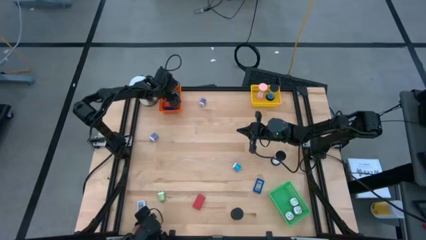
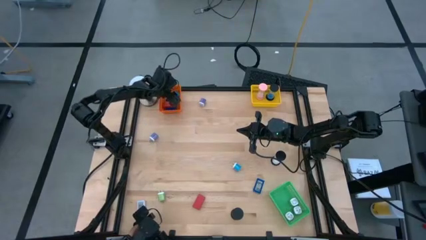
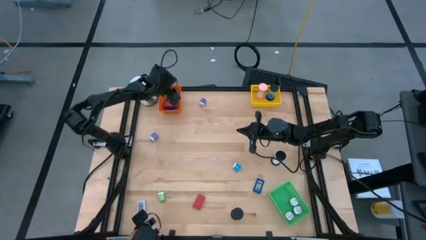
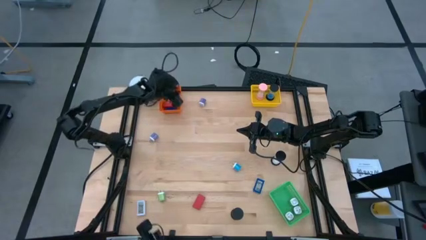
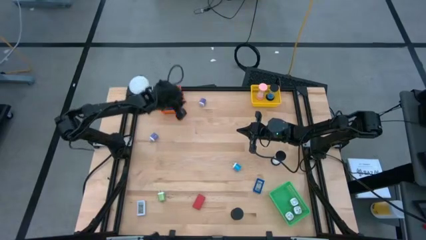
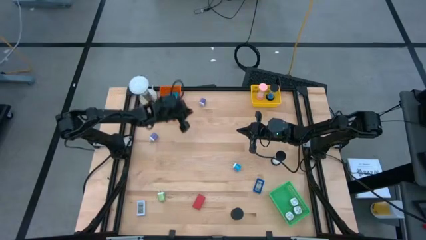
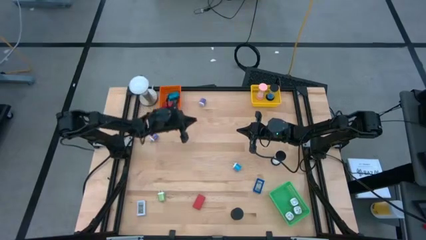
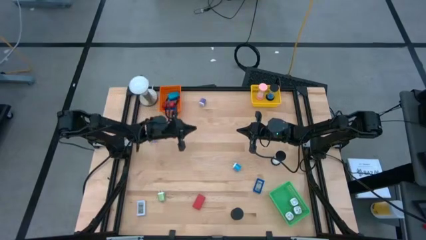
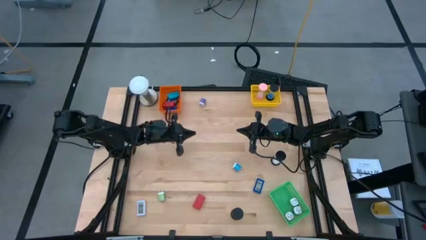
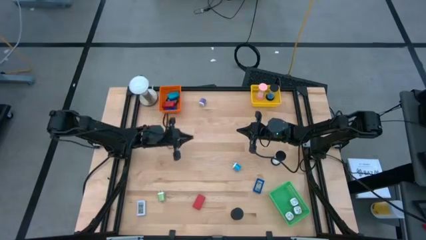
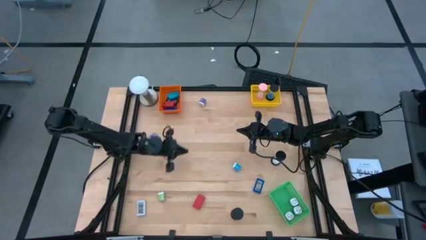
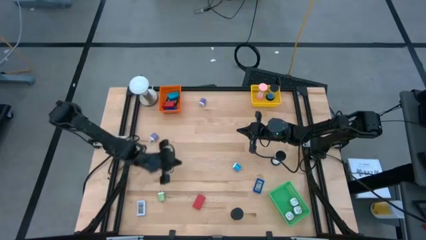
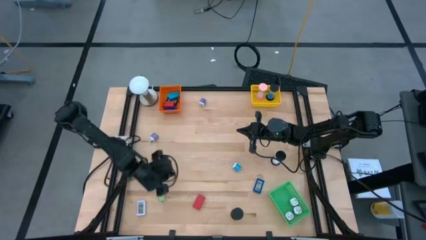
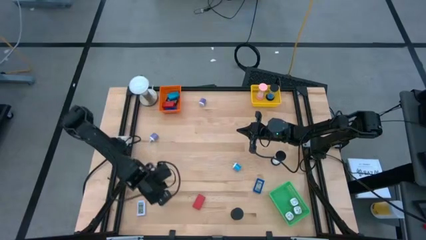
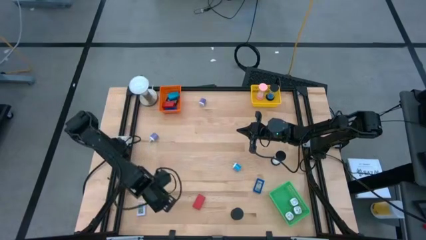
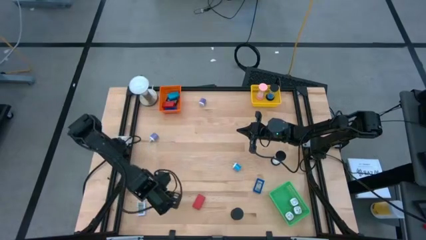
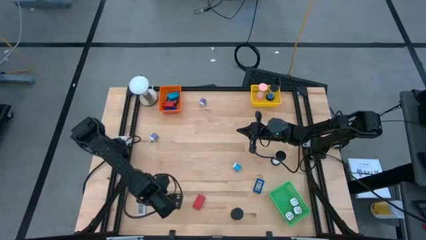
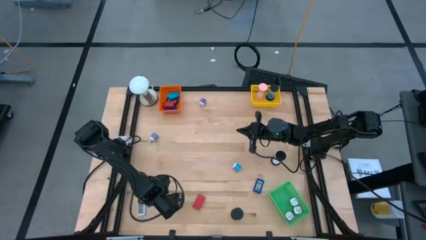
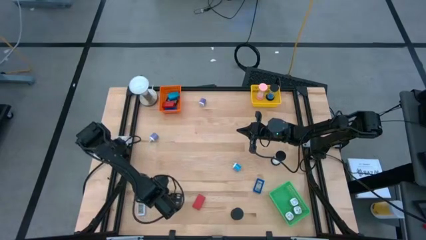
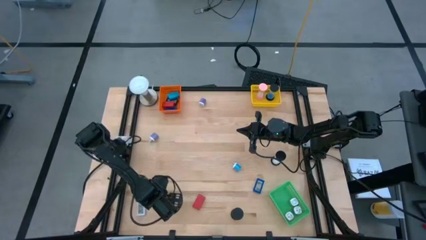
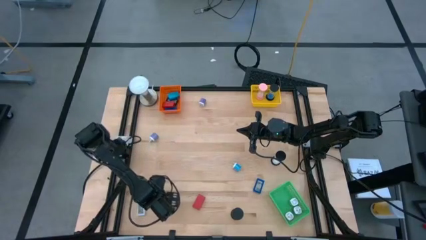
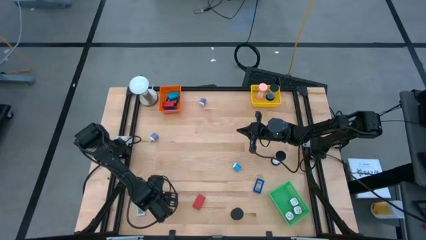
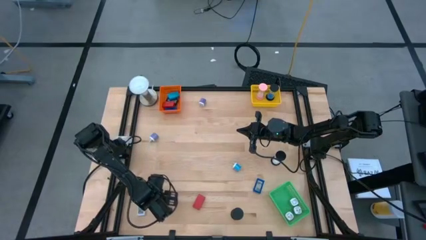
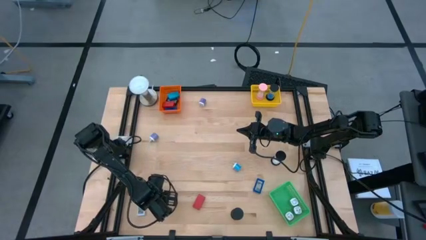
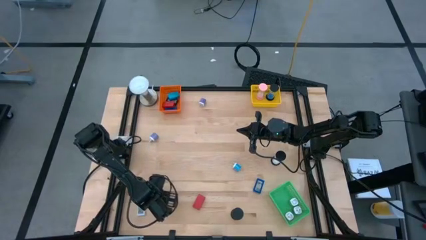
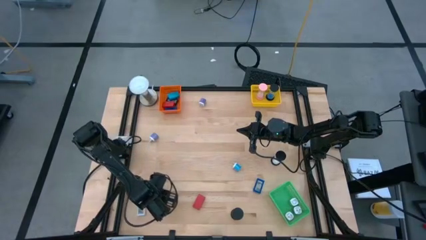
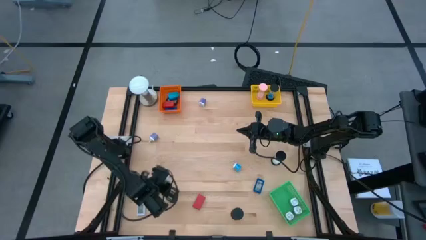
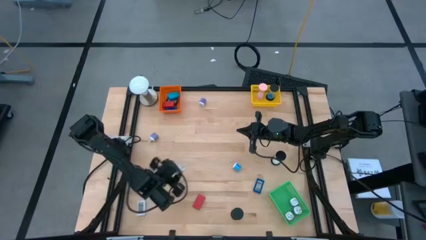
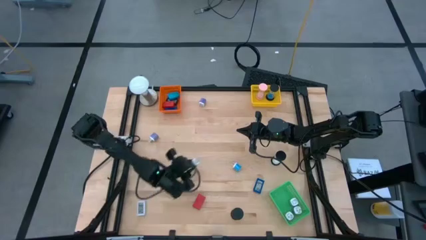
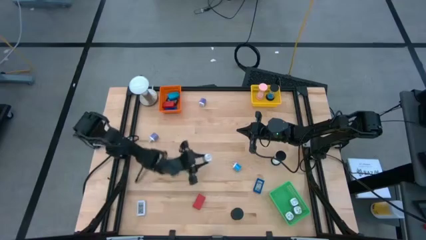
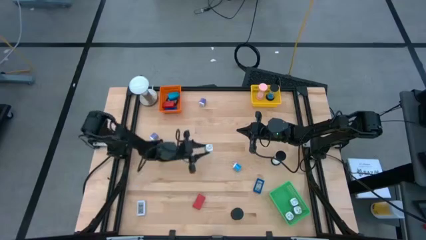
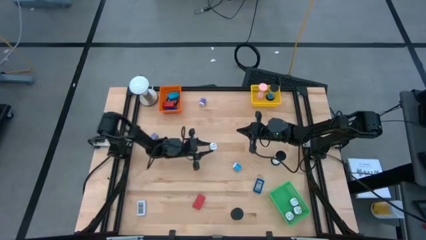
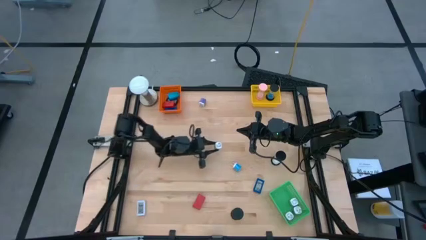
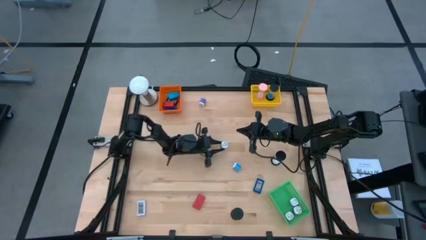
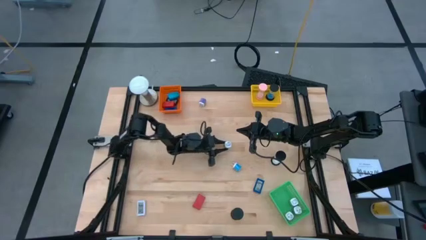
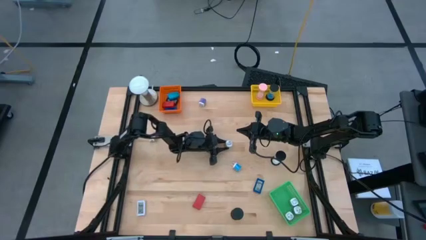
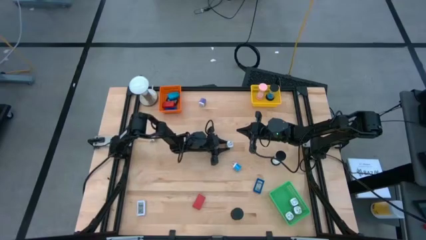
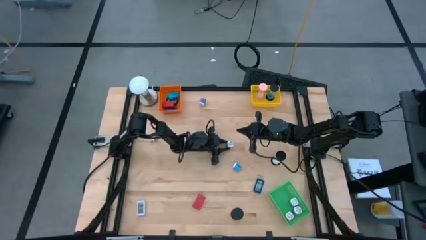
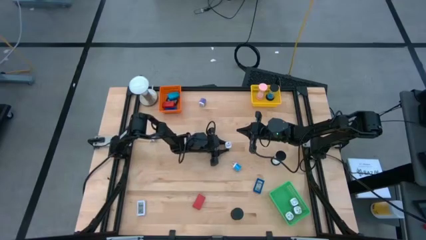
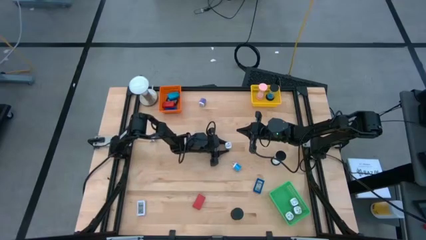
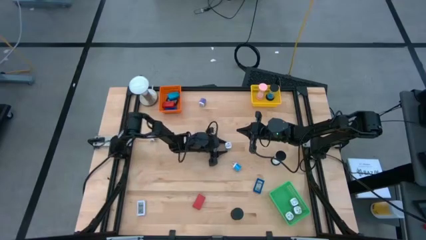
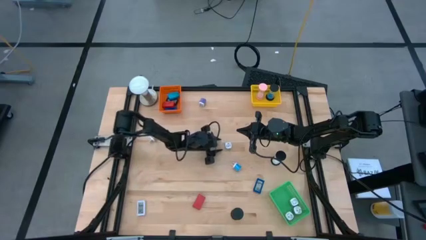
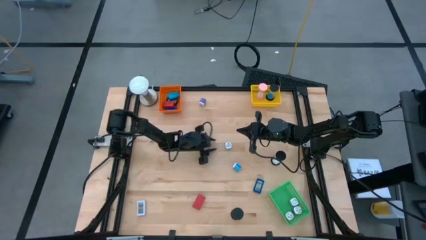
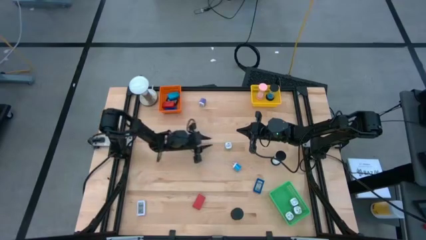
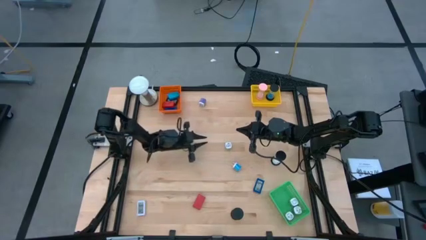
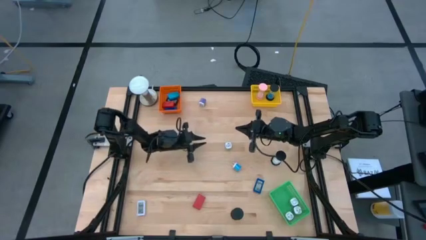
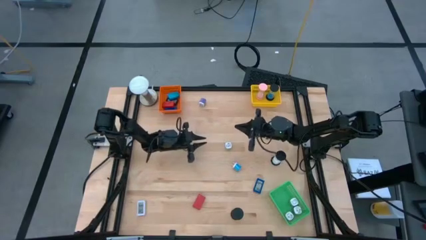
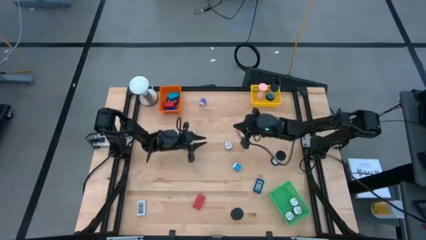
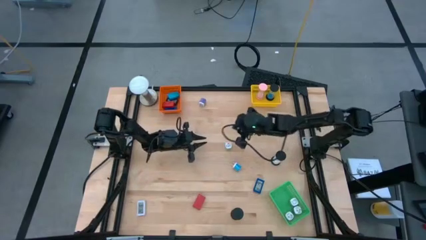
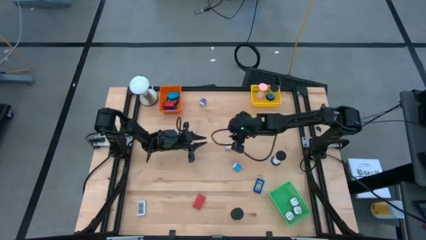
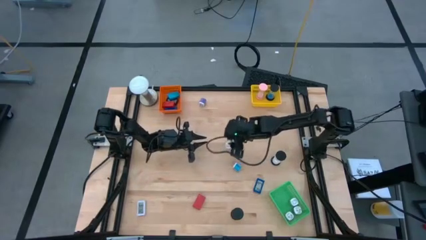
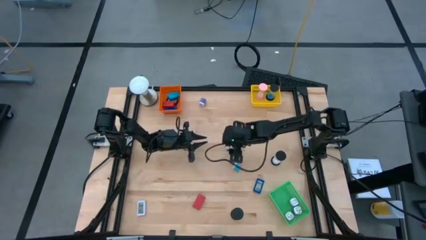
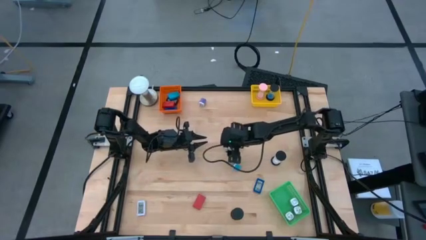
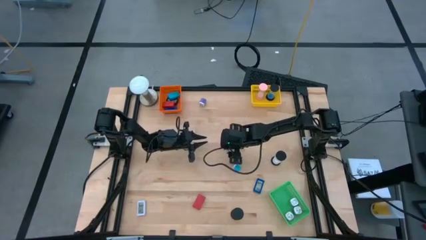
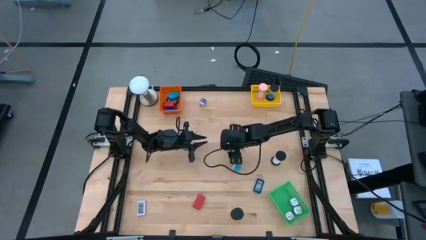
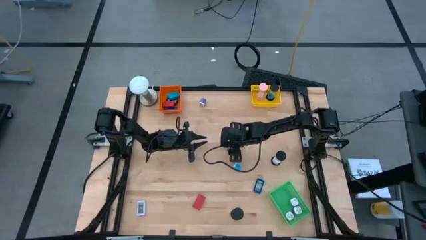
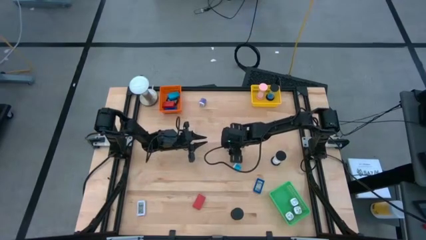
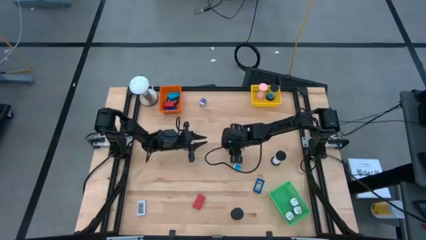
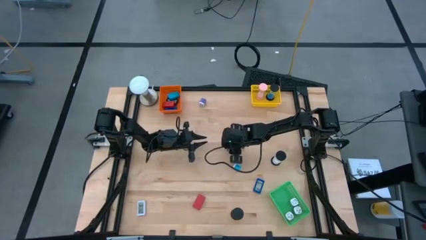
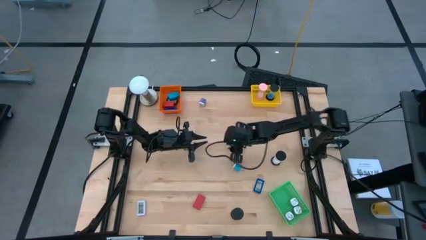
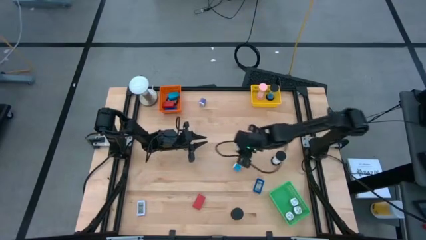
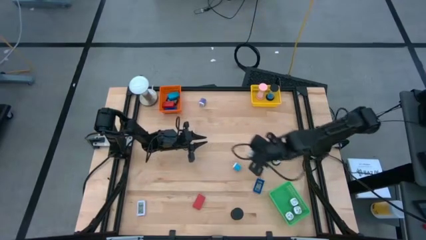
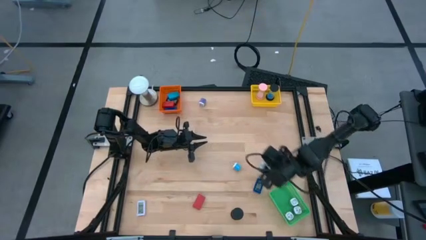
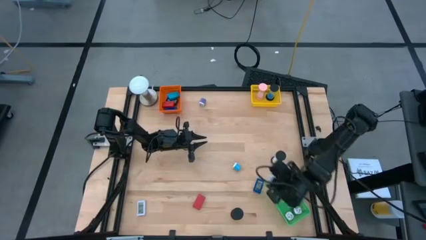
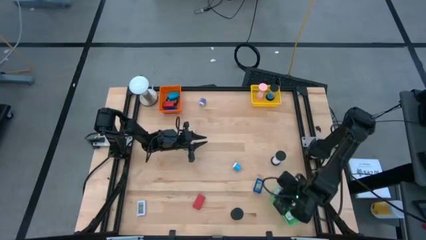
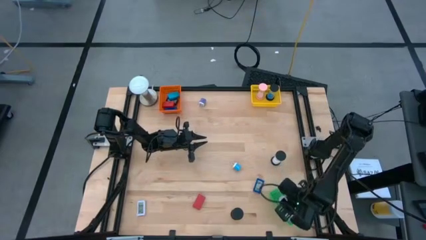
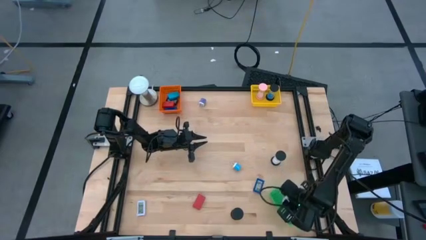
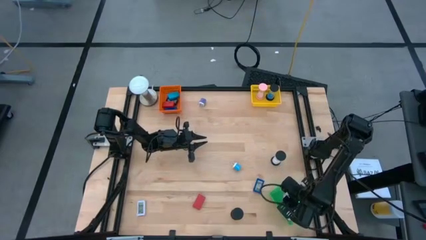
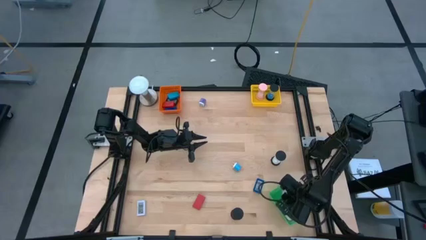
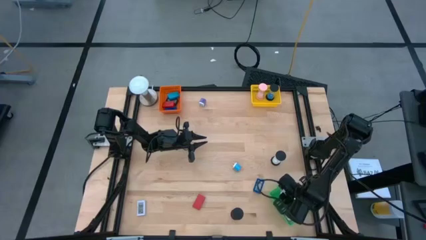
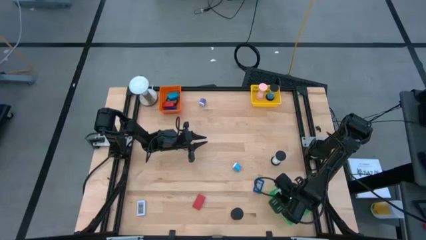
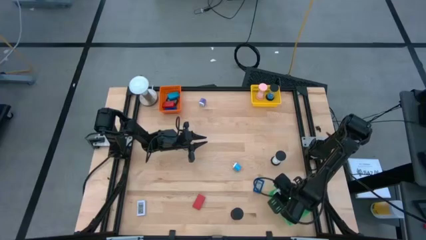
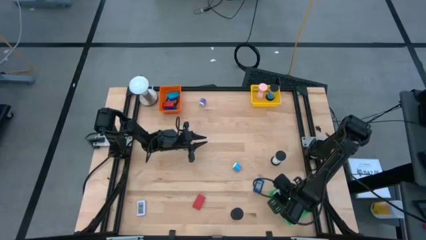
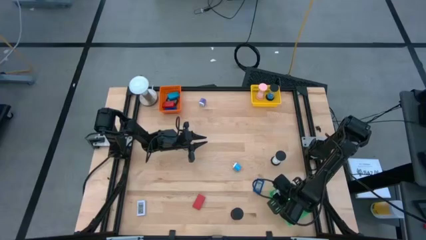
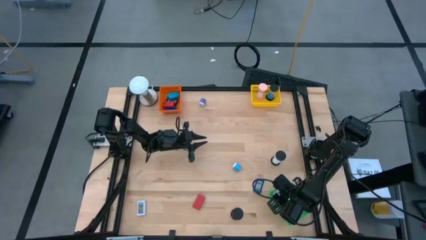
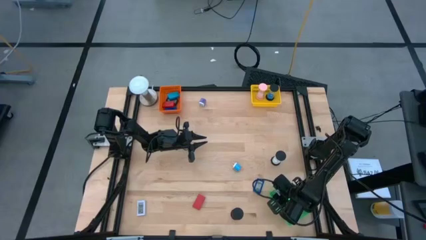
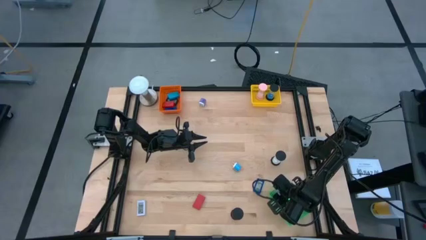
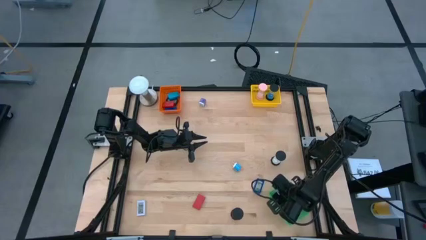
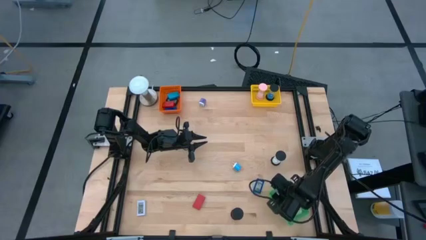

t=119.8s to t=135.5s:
Task: Pick & Place Office items
Put the green charger adapter into the green bin
